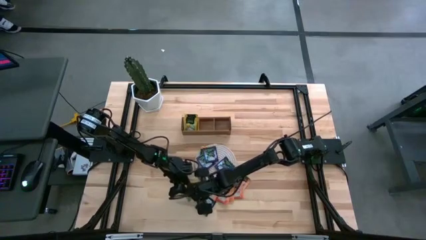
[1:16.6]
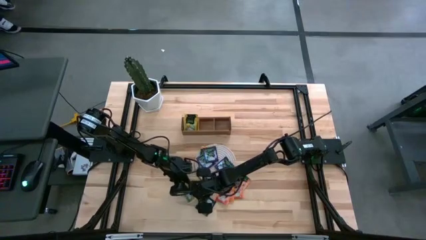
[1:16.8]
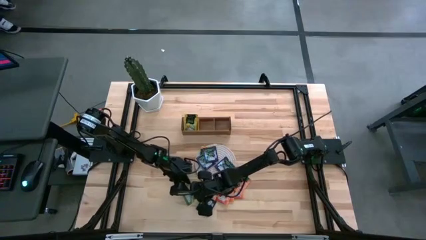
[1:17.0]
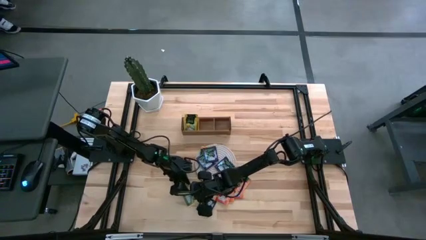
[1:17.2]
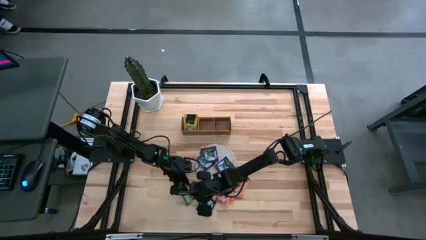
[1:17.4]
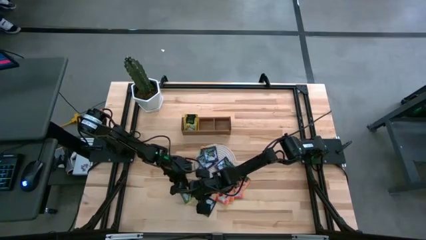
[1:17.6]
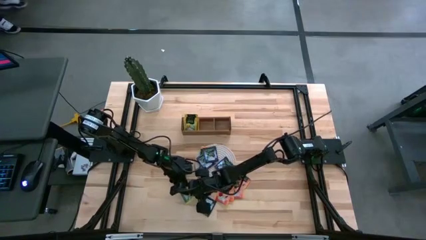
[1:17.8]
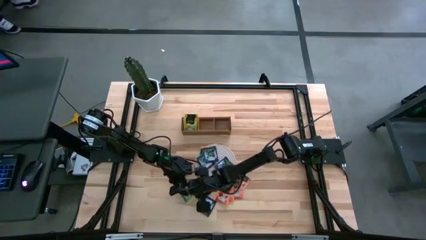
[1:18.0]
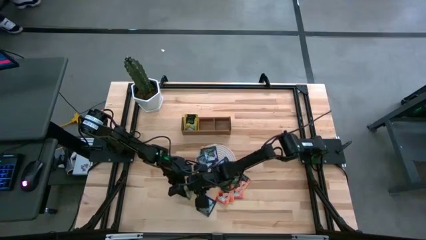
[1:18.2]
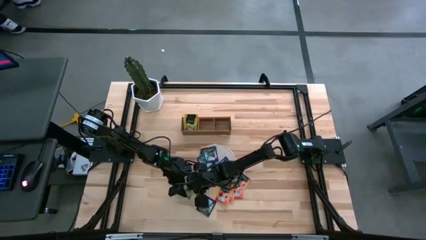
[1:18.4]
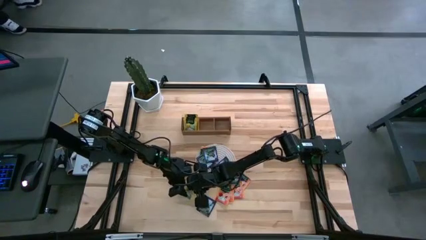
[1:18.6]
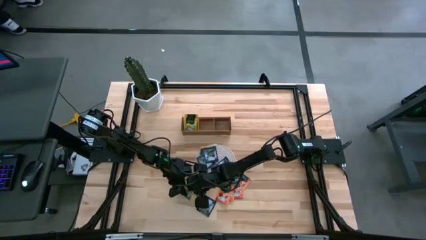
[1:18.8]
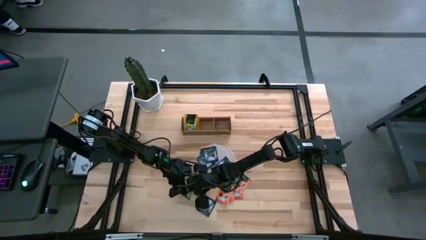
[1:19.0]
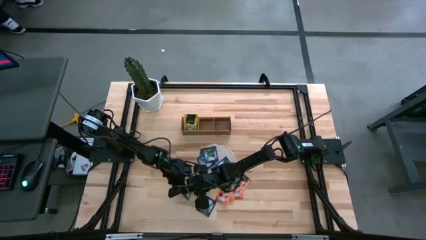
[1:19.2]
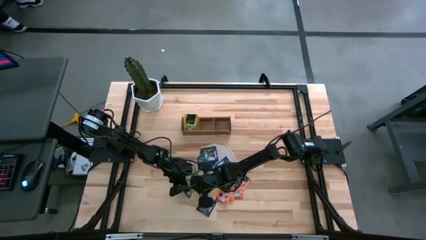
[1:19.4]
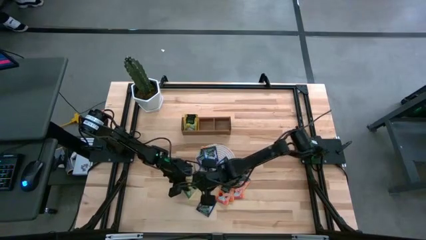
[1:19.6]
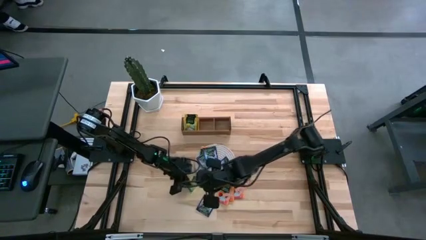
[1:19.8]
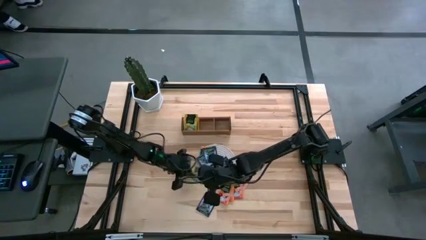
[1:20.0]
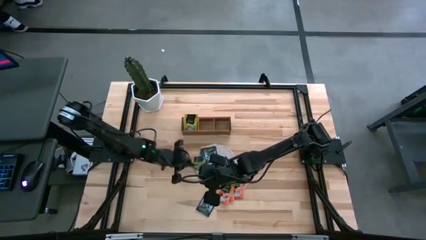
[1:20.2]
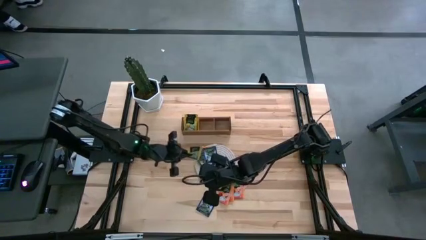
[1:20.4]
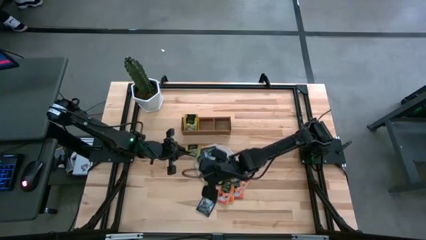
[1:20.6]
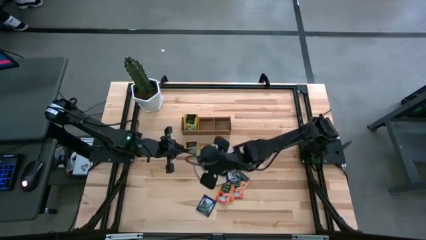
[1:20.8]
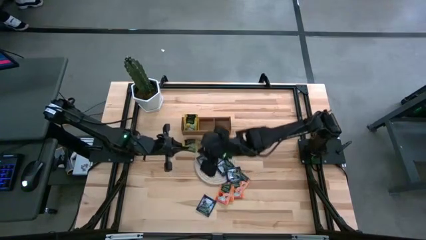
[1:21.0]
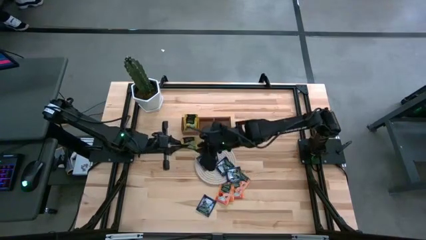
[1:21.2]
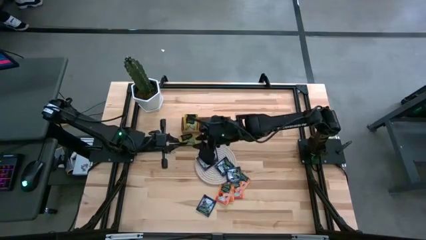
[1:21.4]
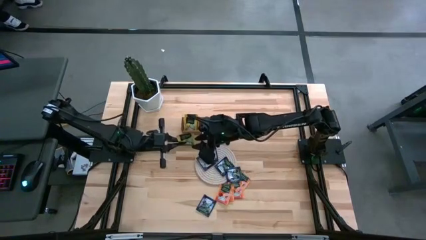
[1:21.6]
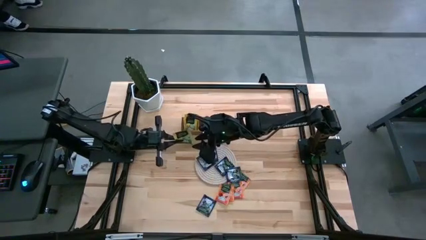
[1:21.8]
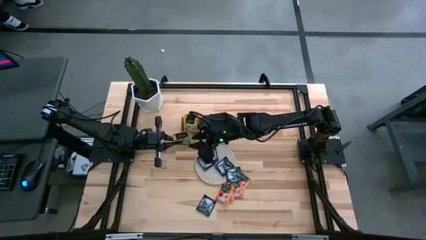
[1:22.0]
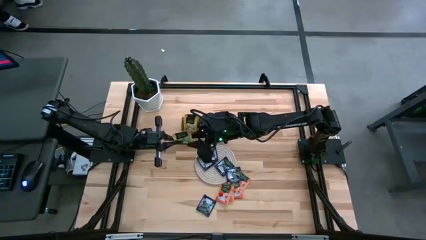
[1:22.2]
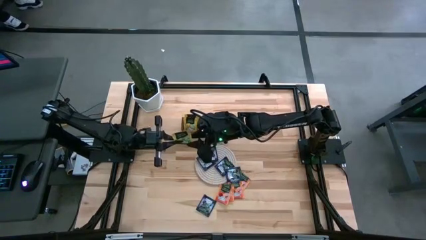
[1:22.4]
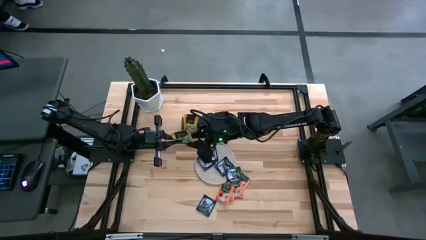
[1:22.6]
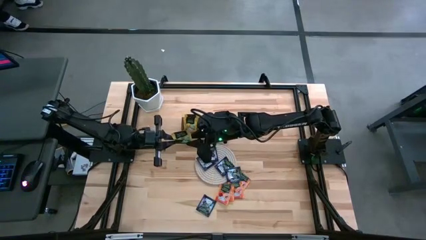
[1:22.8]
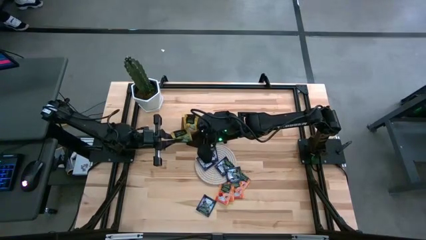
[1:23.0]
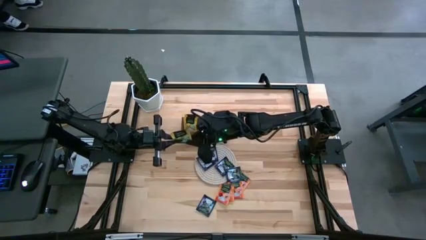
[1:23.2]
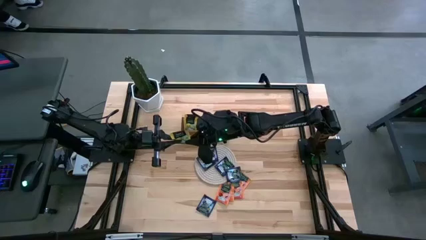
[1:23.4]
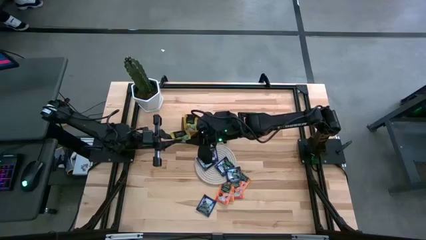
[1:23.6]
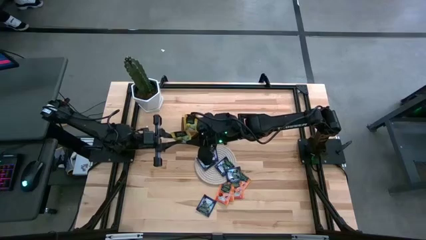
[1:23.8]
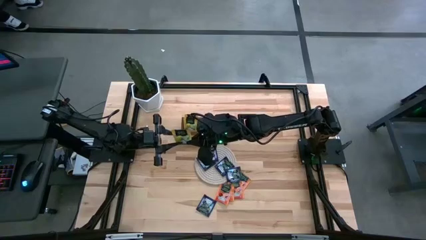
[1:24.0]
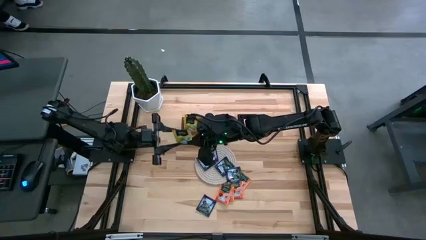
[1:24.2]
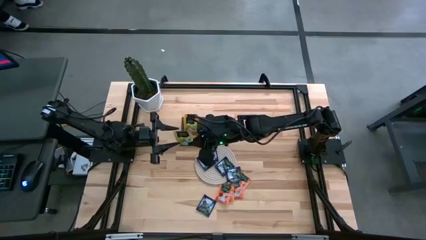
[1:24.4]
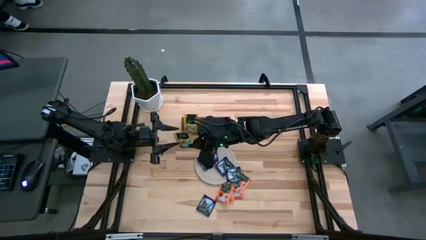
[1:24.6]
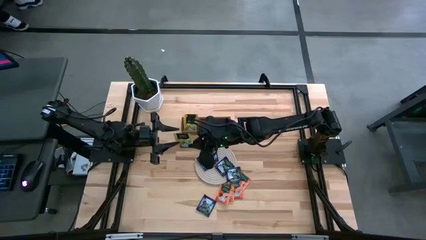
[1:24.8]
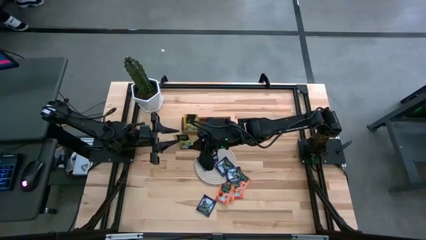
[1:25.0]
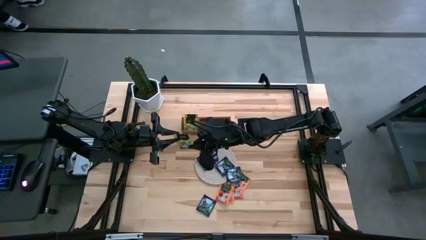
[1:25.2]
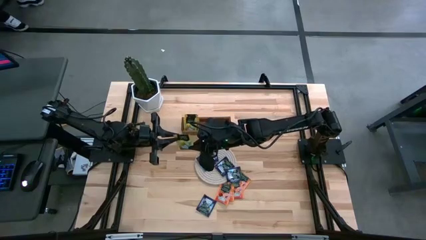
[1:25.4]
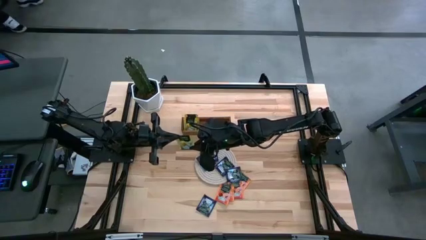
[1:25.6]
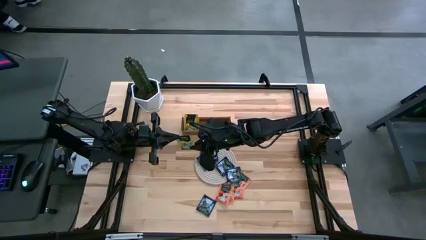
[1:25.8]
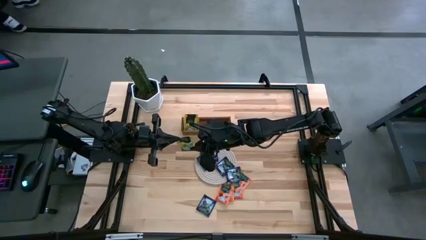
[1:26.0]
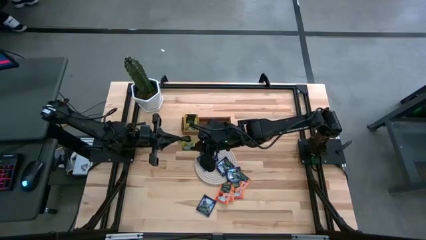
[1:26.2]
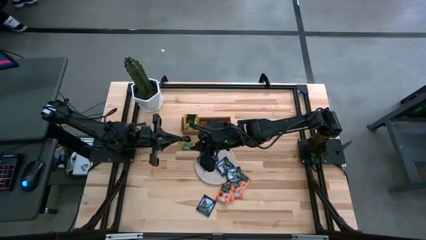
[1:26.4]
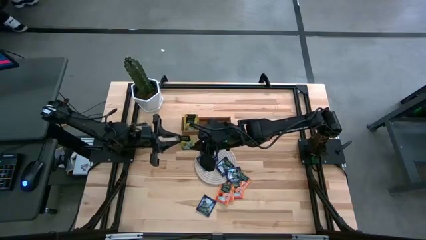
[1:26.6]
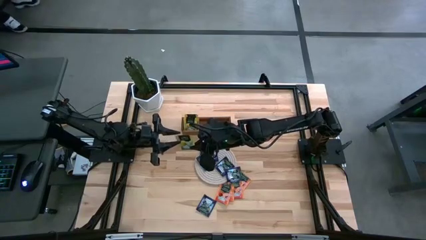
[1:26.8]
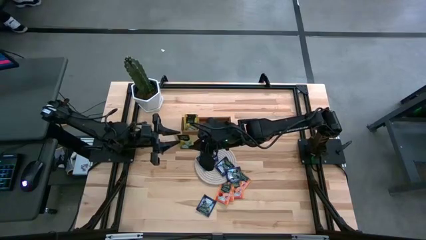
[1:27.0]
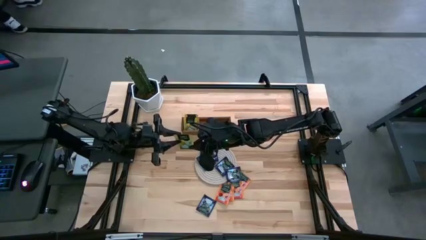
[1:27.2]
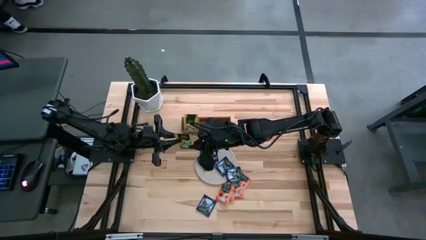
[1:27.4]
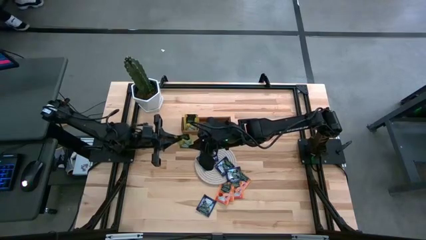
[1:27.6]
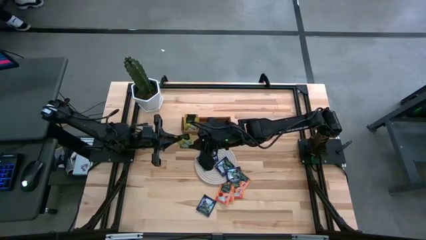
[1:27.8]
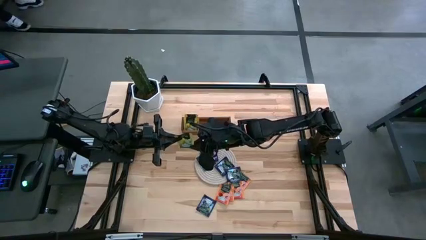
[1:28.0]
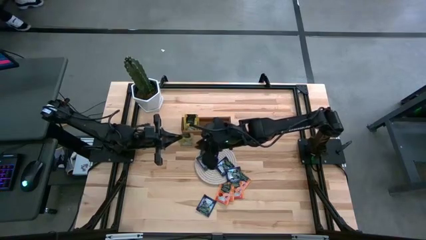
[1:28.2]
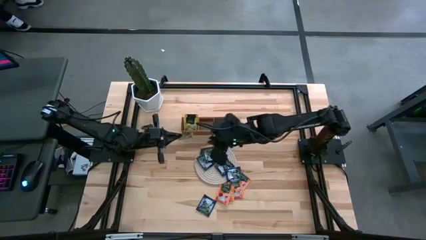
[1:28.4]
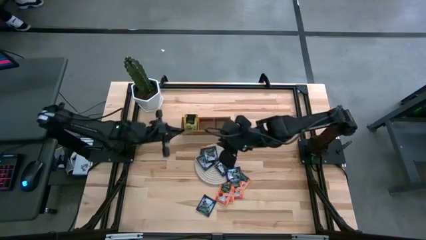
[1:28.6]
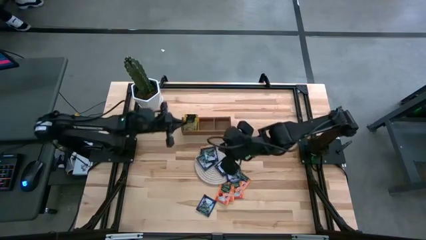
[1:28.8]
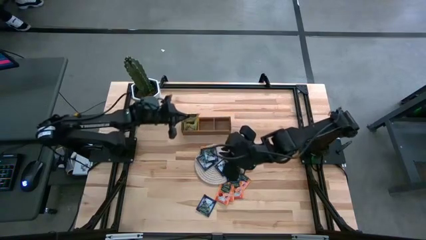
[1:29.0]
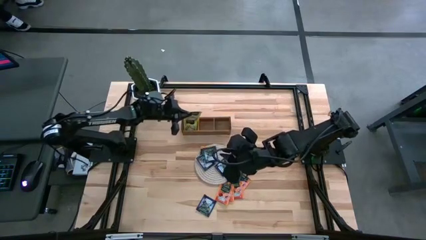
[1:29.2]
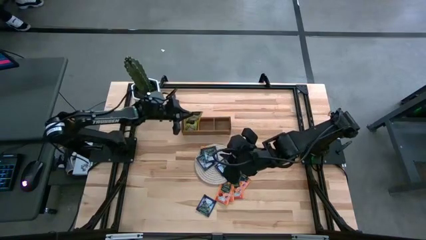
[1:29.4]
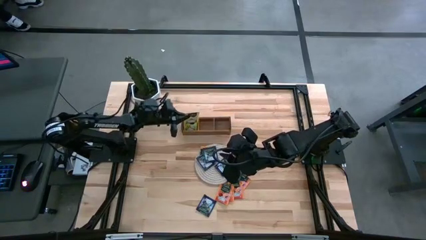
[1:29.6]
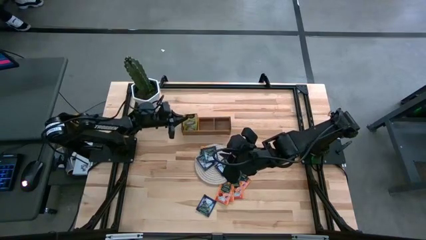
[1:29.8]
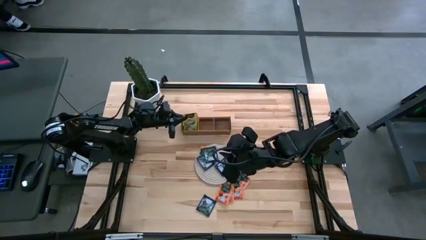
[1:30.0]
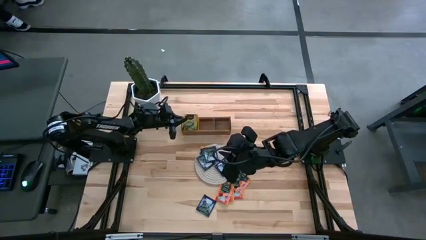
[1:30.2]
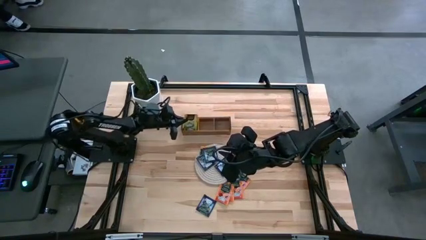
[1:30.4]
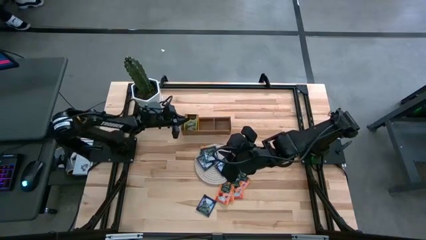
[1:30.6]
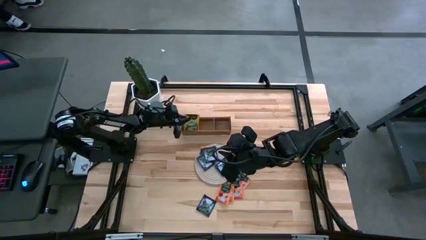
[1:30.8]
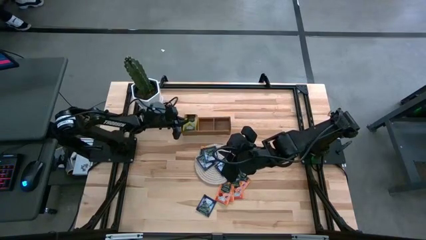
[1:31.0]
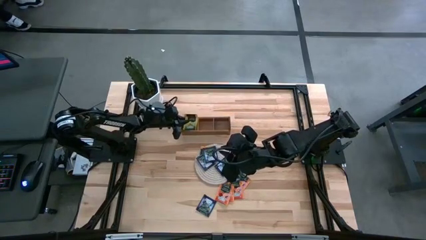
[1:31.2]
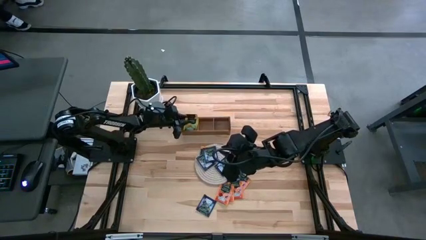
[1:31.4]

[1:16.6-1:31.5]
Task: Pick & Place Tea
Put the yellow tea bag into the left section of the wooden organizer

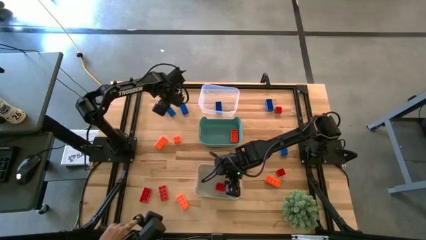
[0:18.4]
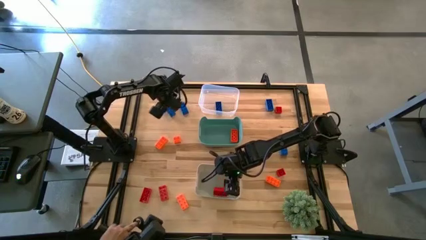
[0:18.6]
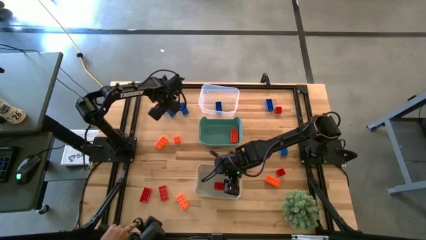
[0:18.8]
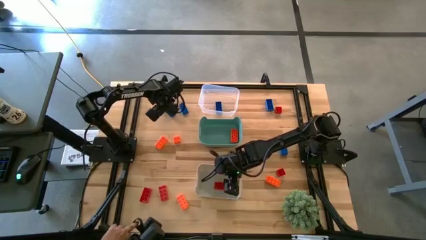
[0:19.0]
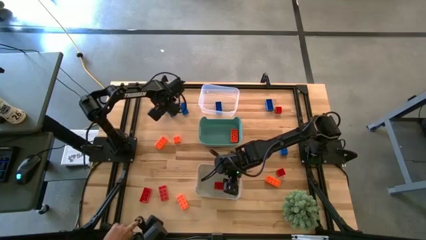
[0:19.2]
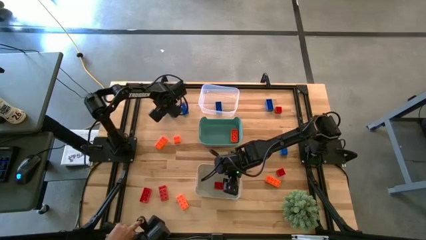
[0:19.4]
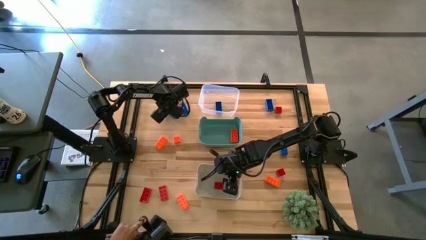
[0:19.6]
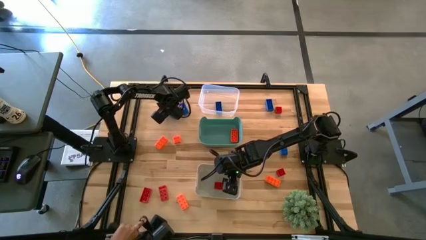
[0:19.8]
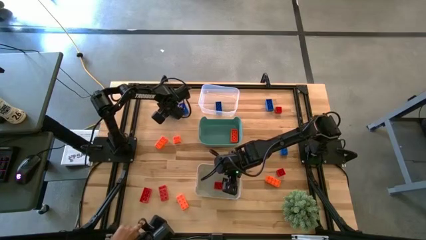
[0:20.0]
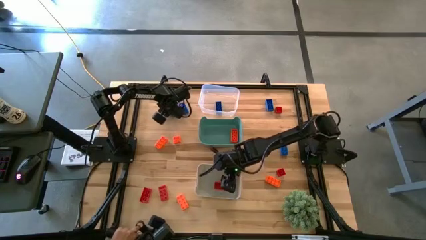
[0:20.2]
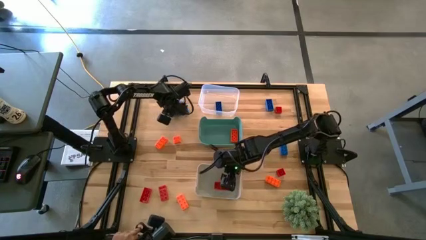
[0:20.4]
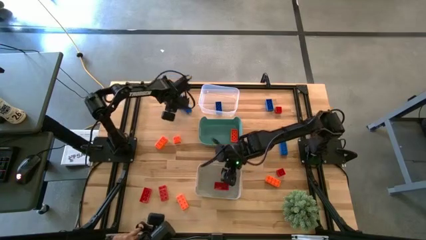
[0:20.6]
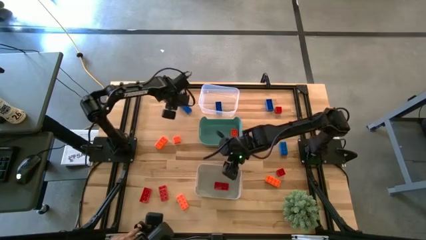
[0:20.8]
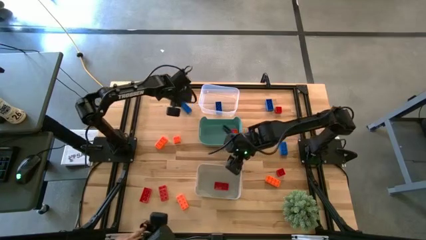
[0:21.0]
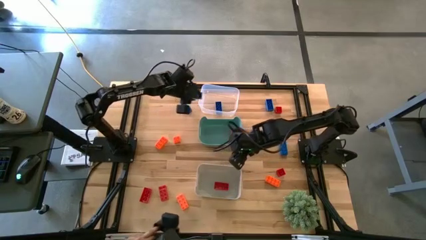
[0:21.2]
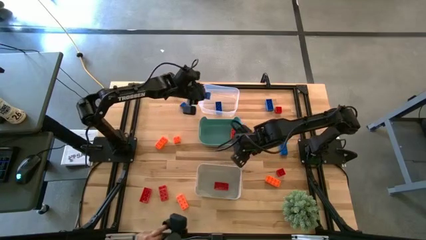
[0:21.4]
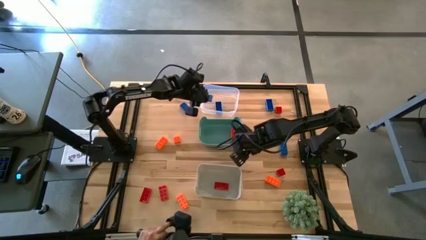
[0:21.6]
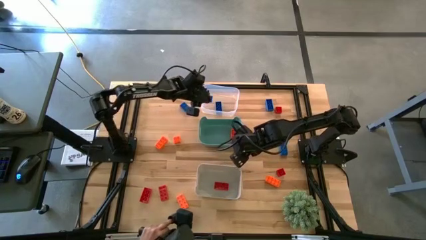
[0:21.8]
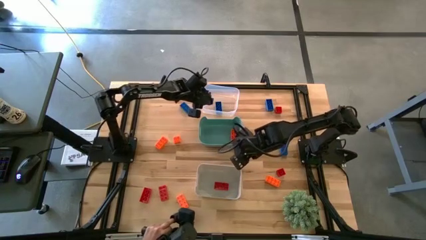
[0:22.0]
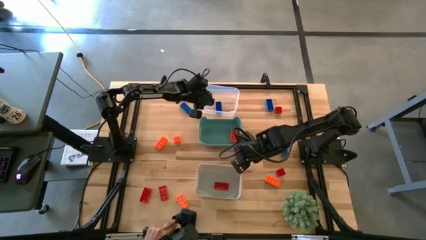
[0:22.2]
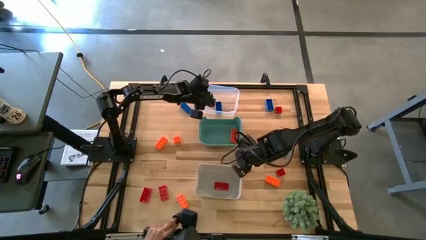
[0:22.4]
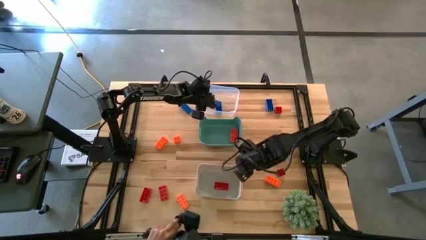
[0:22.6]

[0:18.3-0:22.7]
Task: Sort & place blocks by color
Put the blue game piece into the transparent bin
